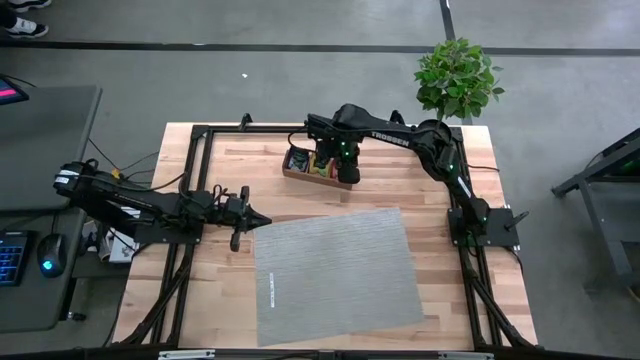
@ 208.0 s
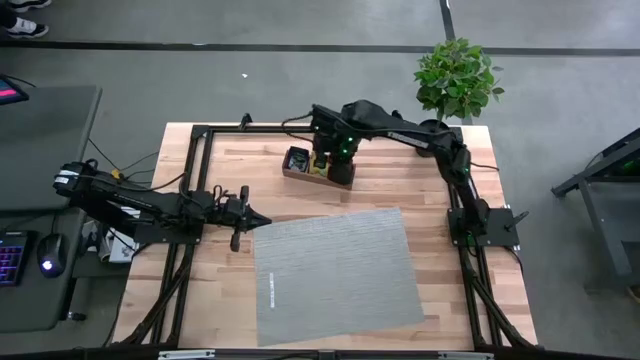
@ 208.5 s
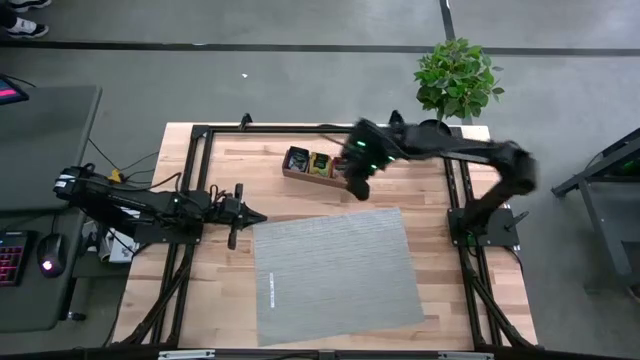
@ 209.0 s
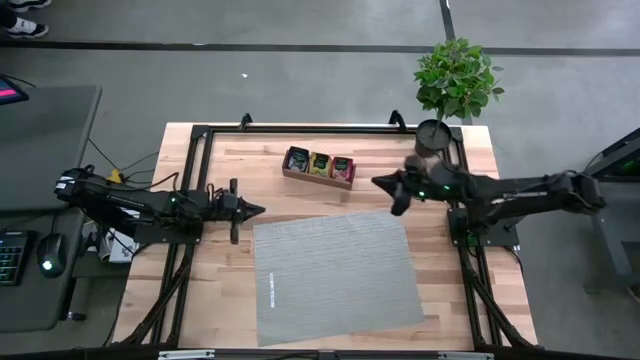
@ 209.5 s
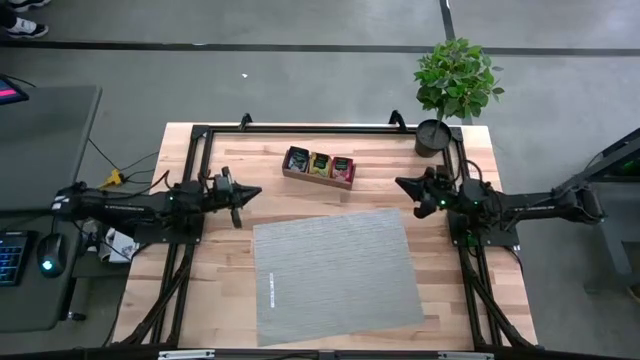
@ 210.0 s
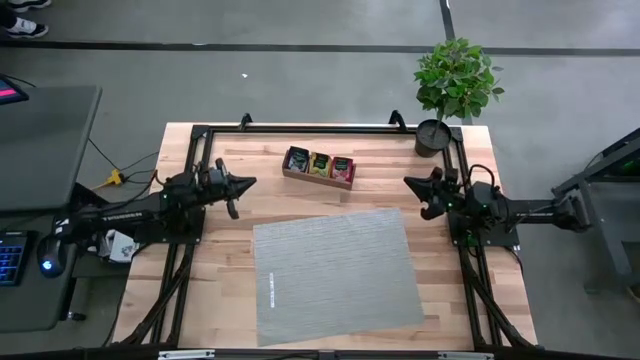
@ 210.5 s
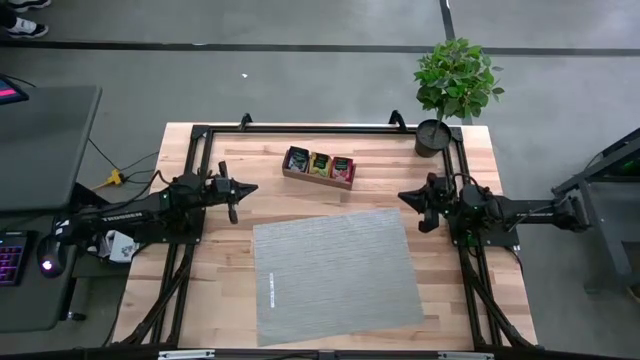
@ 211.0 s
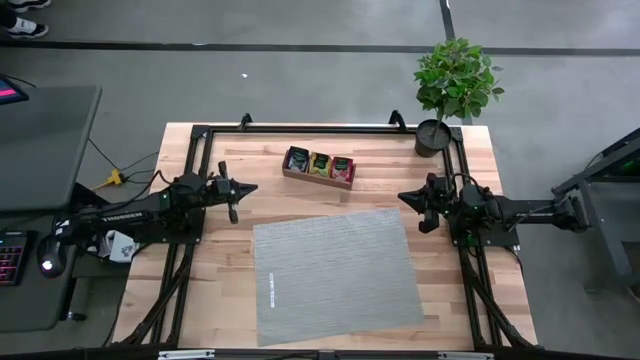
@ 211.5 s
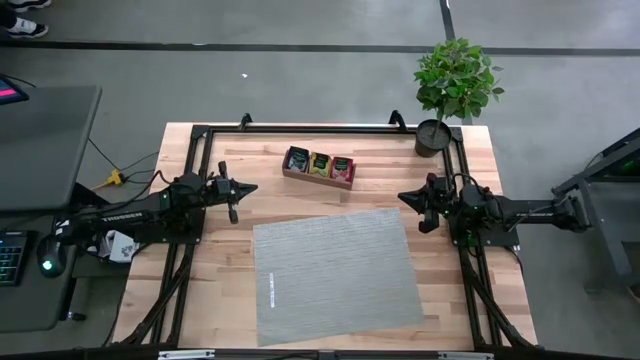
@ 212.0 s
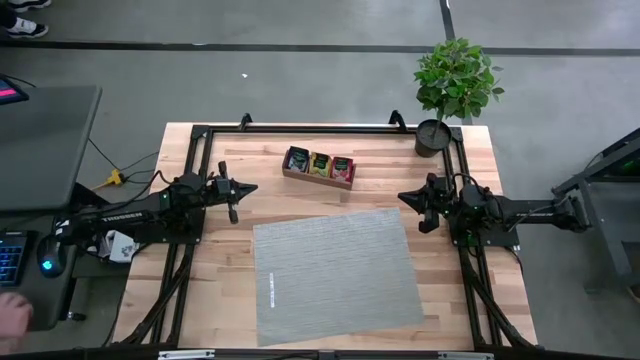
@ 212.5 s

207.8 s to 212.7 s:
Task: Pick & Place Tea
Return to Home Position

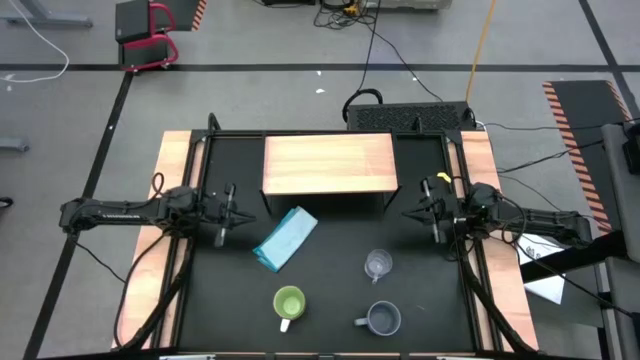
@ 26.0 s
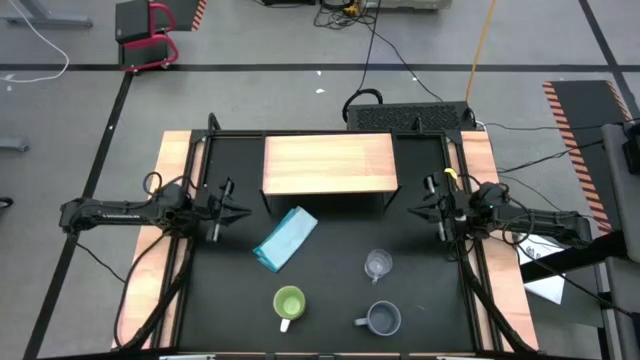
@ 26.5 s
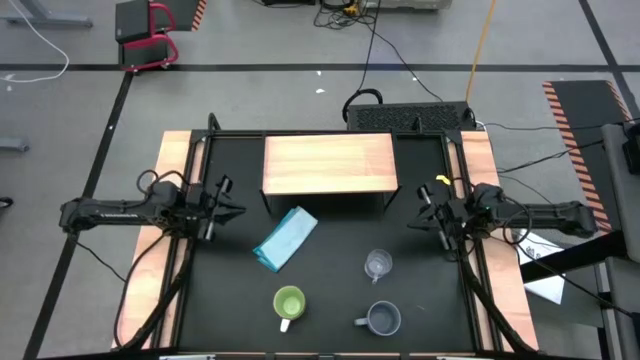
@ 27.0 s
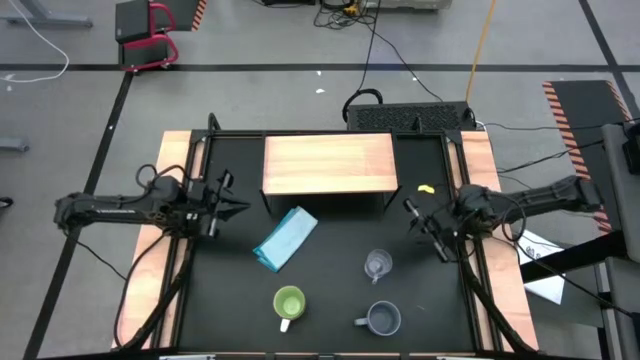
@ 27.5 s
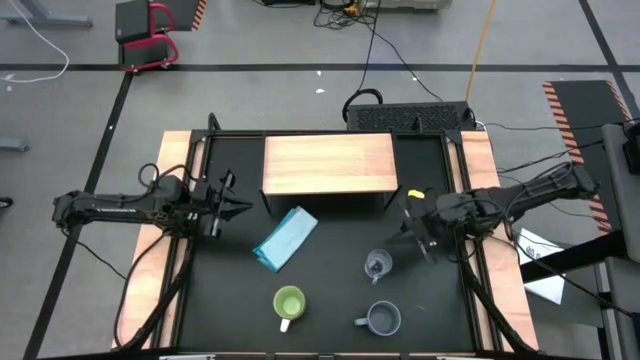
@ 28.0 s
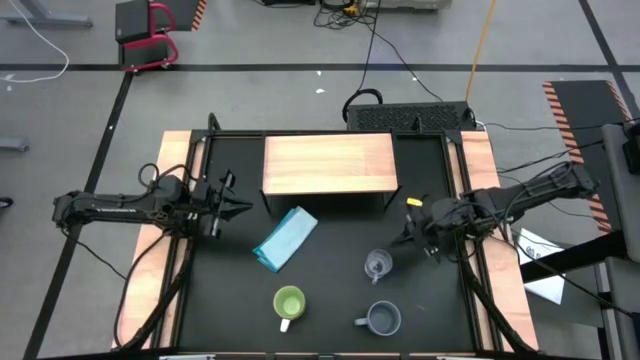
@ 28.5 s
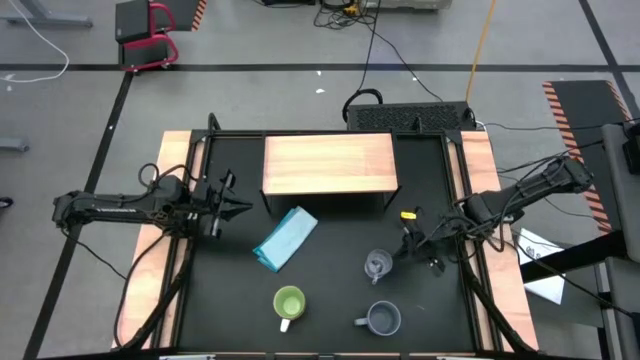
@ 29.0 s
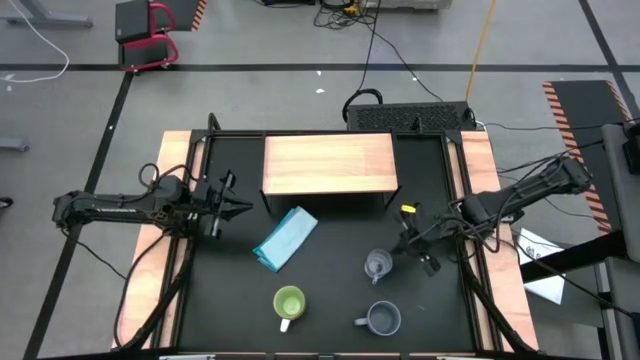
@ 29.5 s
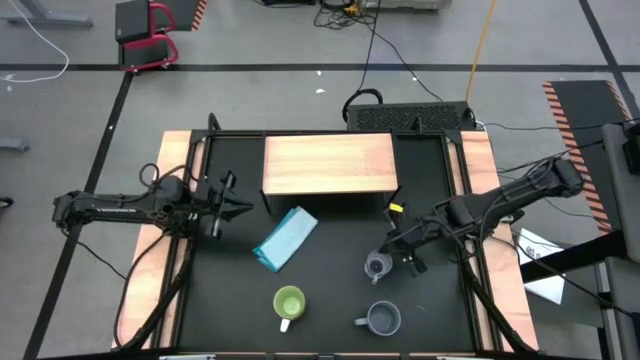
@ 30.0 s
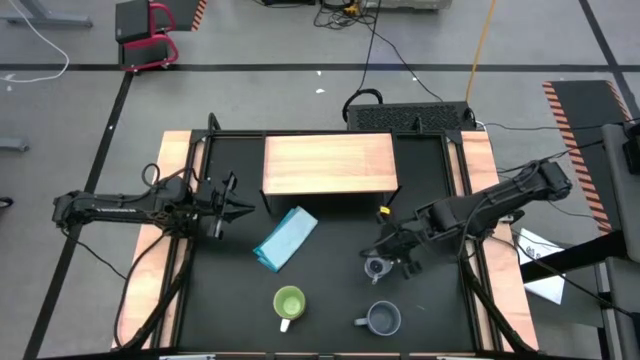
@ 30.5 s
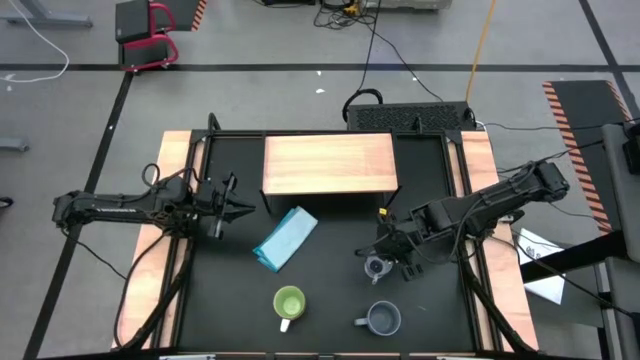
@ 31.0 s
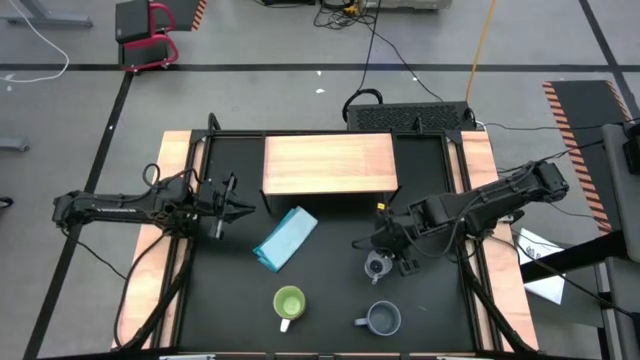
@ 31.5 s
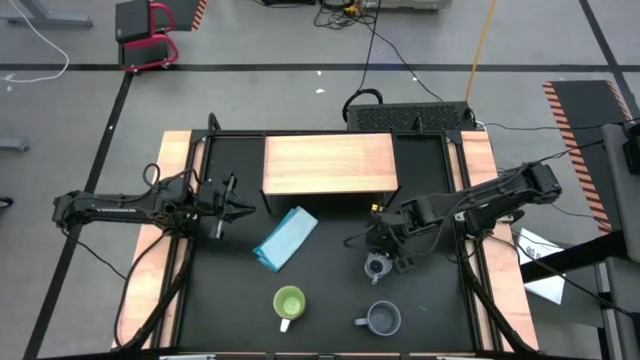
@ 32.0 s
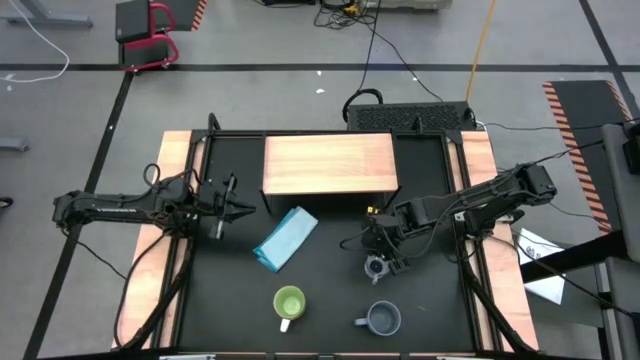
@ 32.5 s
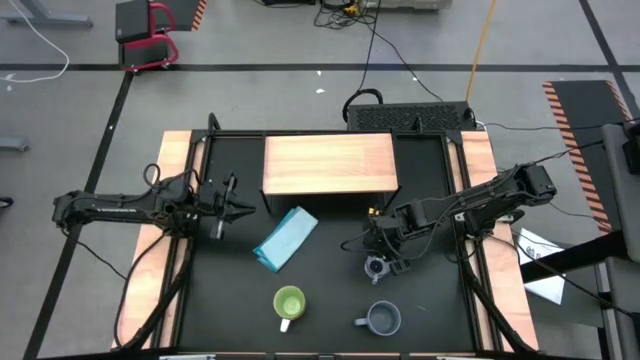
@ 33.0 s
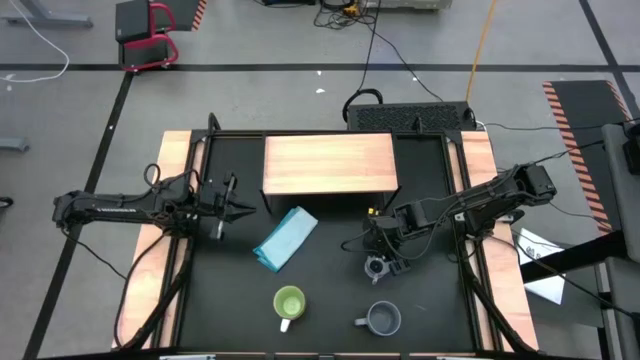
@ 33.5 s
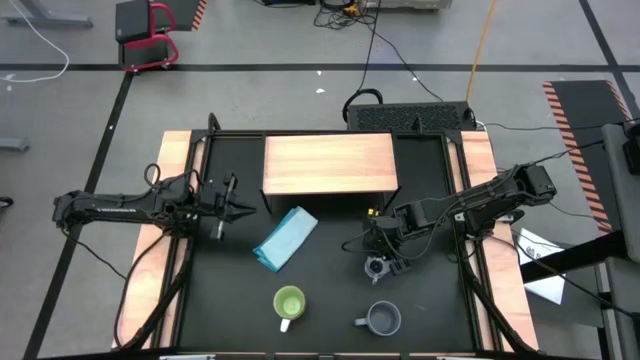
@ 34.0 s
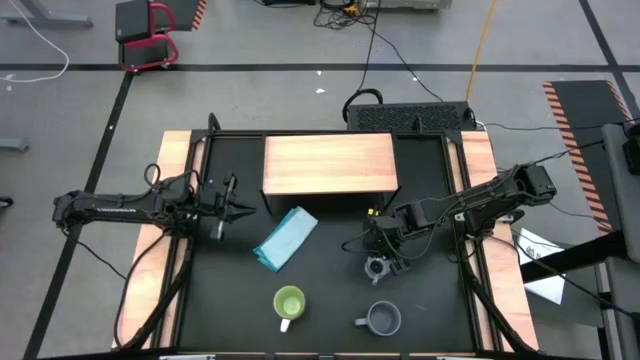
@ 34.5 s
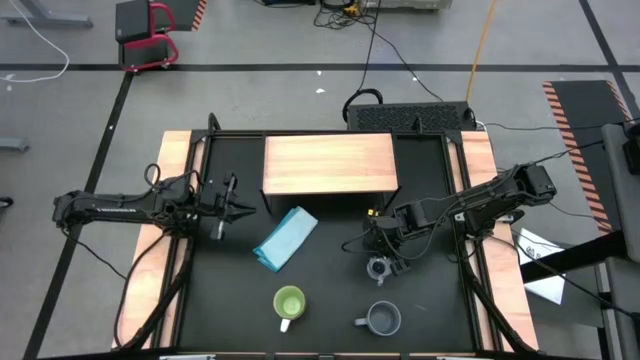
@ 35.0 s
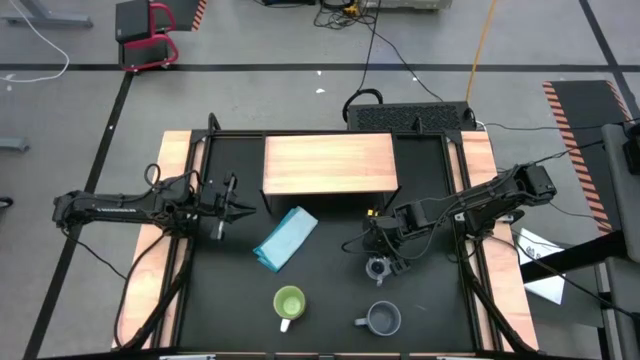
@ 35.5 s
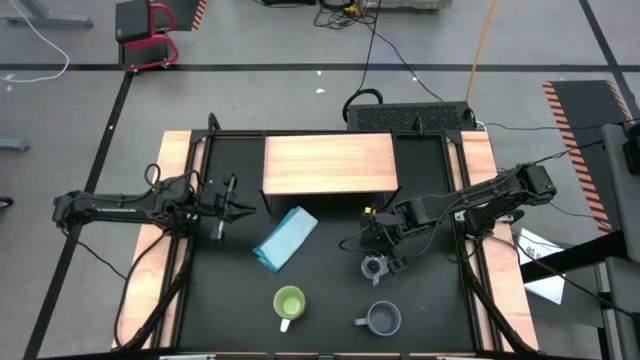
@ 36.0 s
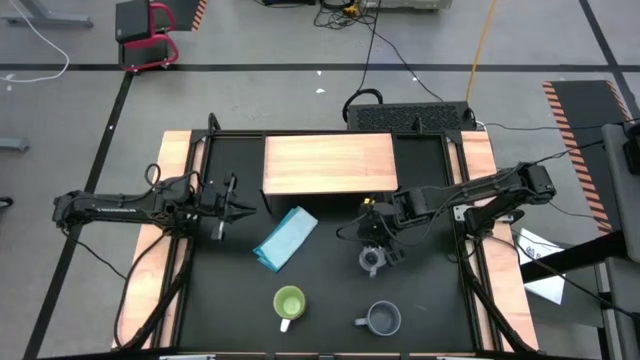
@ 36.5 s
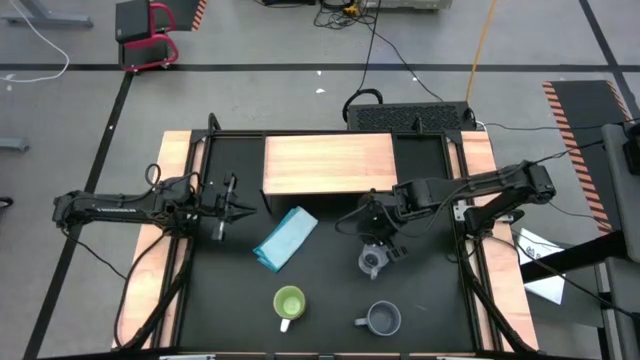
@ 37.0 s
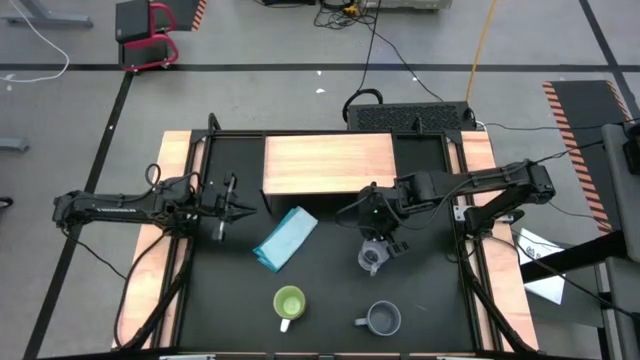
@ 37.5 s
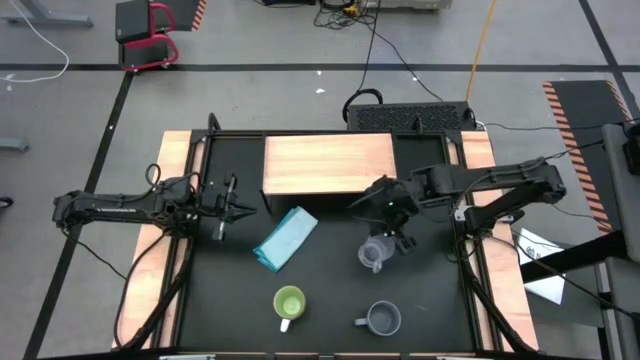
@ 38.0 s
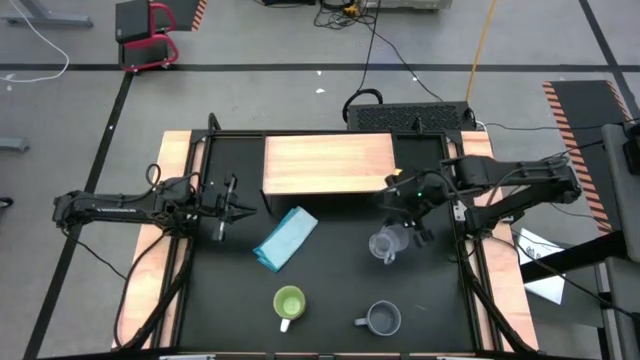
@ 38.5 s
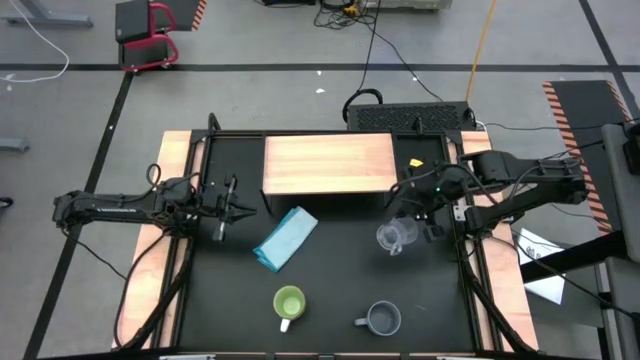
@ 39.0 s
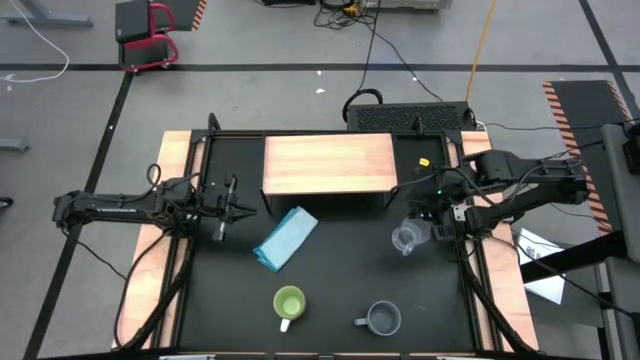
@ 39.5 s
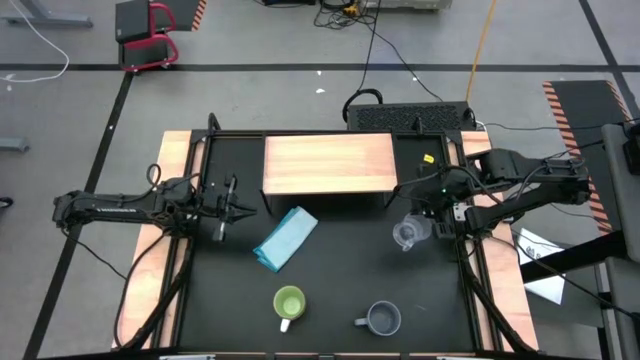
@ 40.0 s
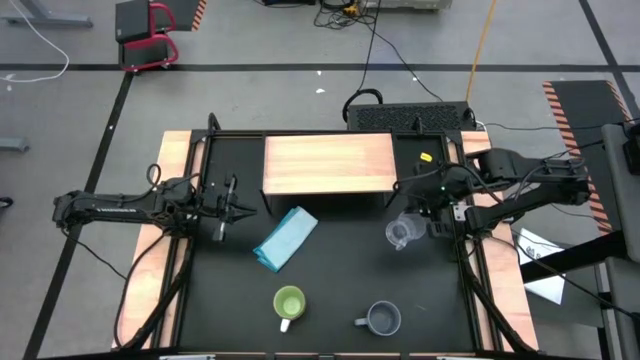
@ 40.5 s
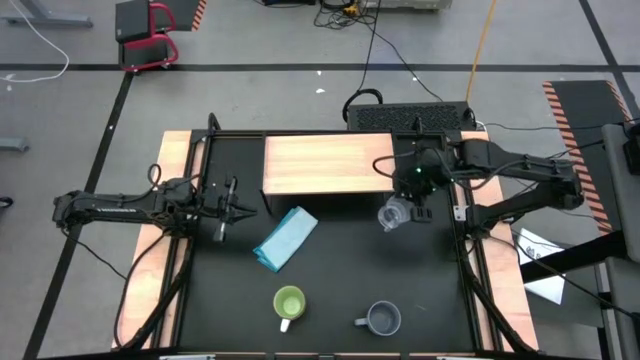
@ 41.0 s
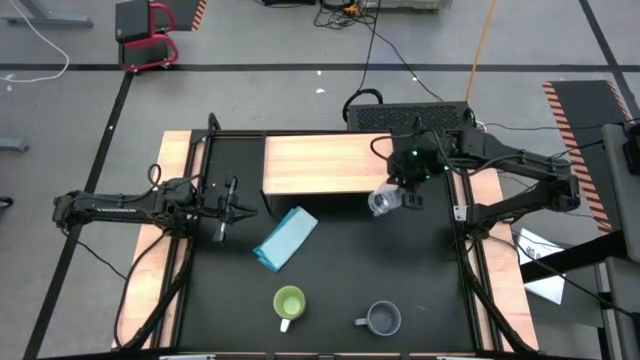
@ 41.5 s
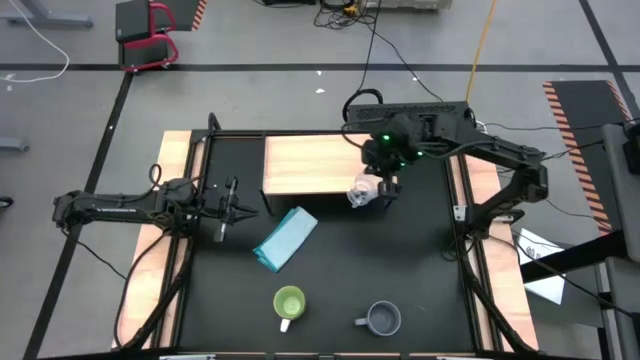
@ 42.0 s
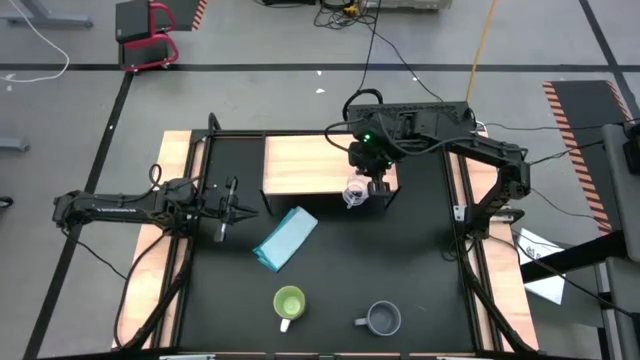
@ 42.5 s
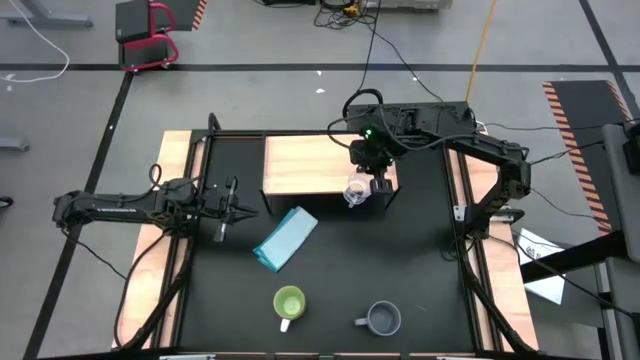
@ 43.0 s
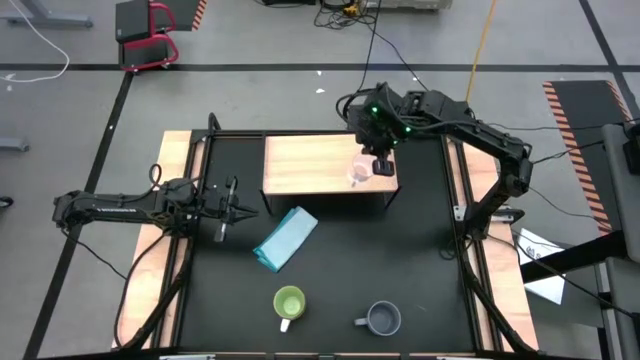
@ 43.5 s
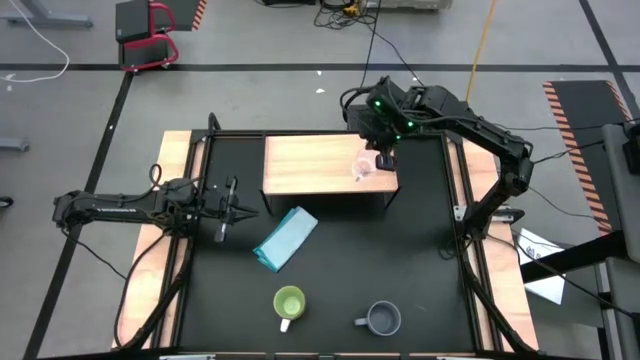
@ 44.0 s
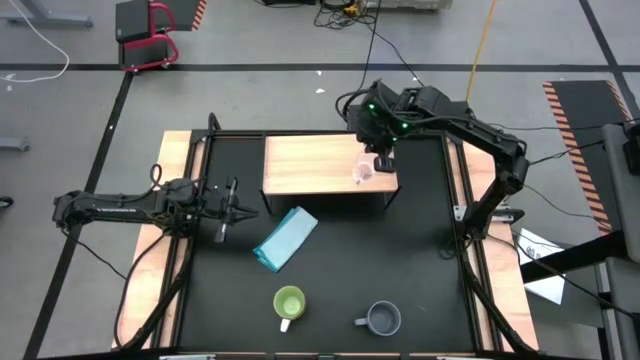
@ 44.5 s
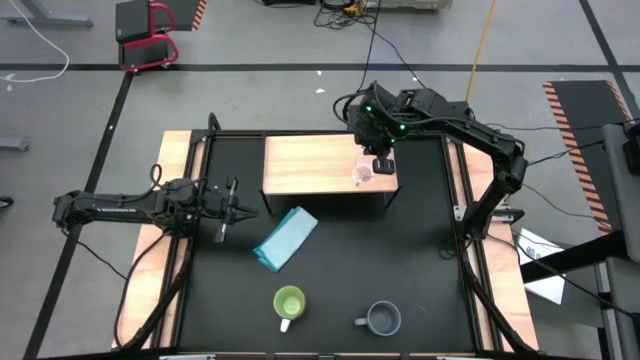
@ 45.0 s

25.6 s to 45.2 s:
Task: Stack small to large cups/mugs on shelf
Put the transparent mug on the shelf
